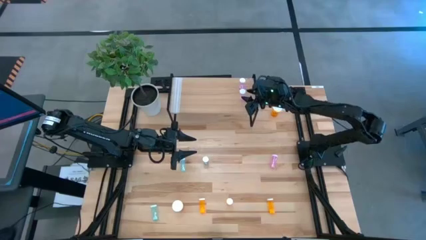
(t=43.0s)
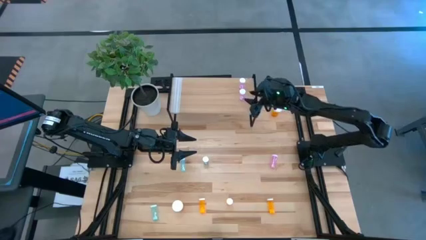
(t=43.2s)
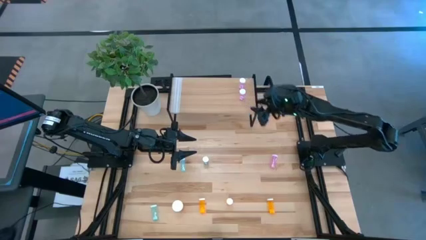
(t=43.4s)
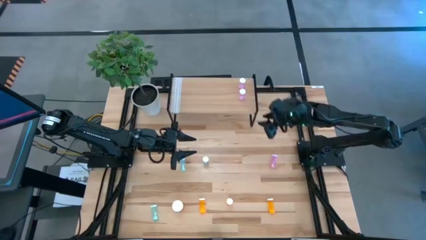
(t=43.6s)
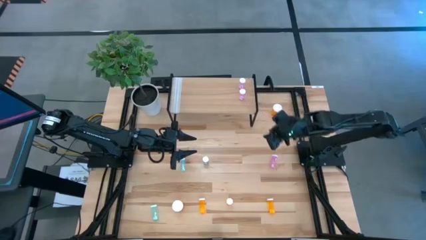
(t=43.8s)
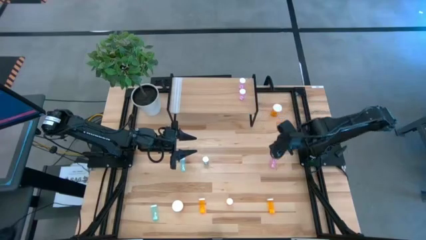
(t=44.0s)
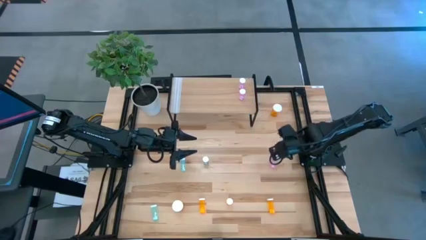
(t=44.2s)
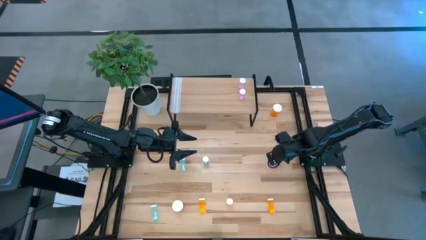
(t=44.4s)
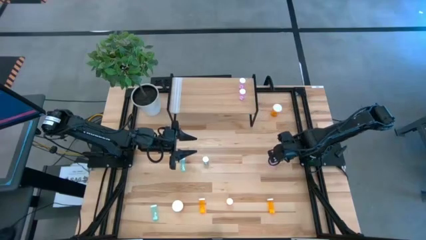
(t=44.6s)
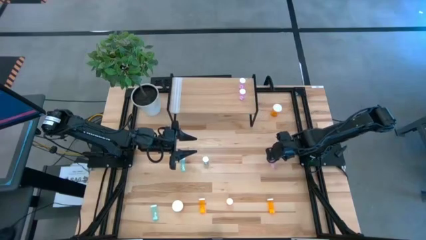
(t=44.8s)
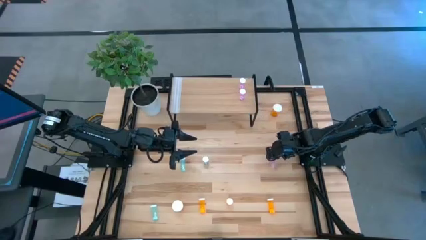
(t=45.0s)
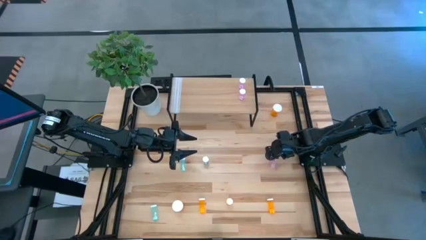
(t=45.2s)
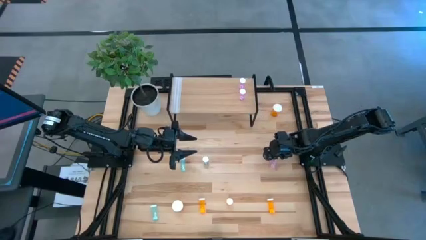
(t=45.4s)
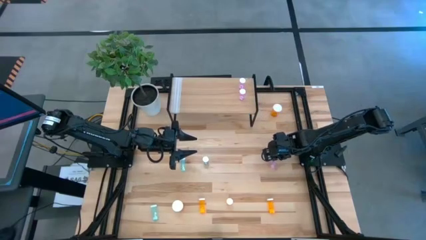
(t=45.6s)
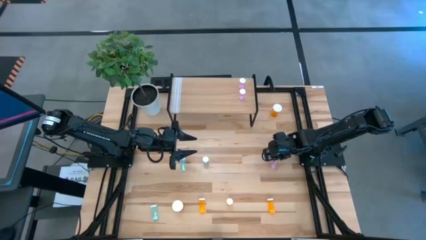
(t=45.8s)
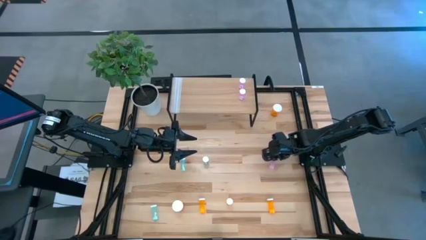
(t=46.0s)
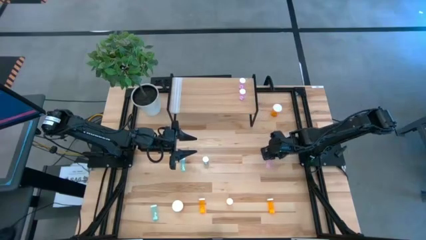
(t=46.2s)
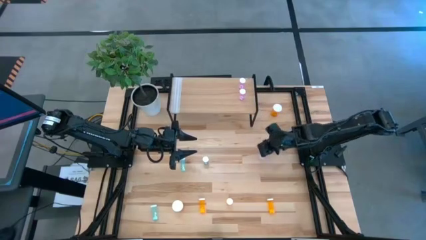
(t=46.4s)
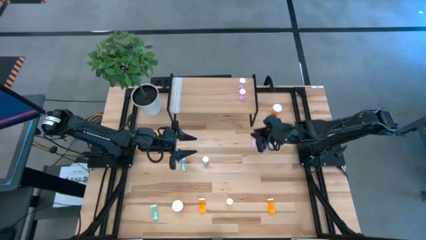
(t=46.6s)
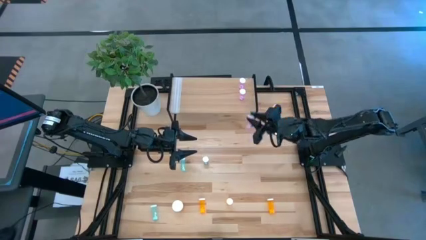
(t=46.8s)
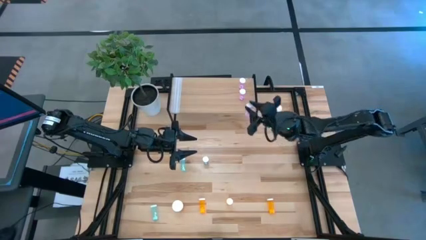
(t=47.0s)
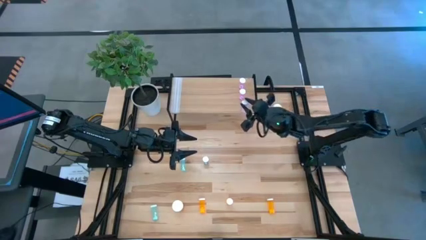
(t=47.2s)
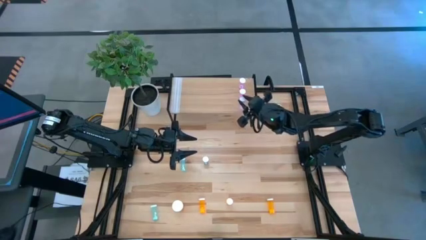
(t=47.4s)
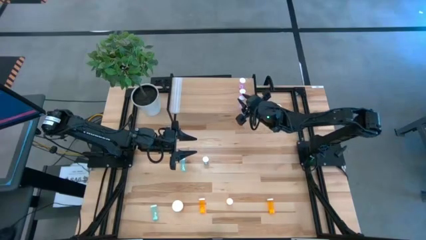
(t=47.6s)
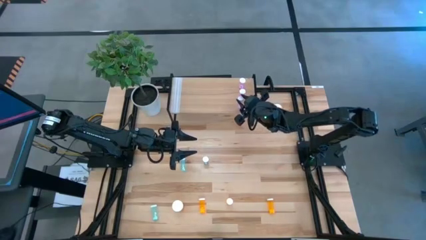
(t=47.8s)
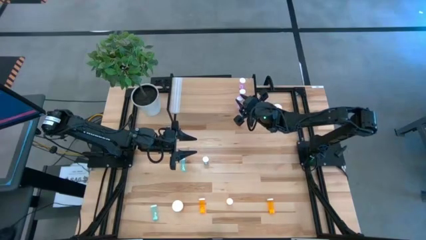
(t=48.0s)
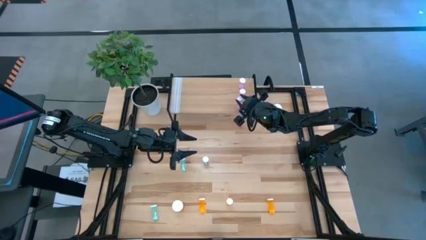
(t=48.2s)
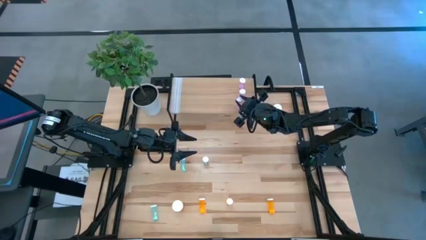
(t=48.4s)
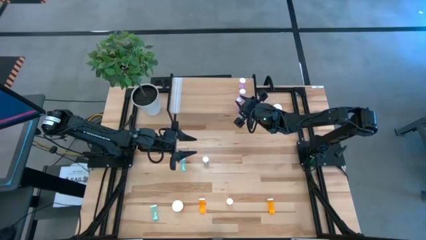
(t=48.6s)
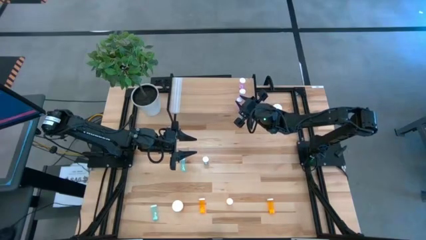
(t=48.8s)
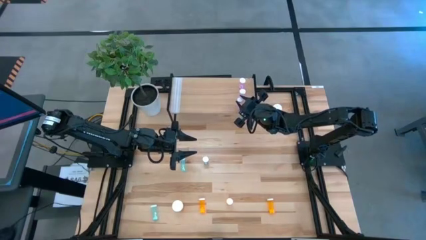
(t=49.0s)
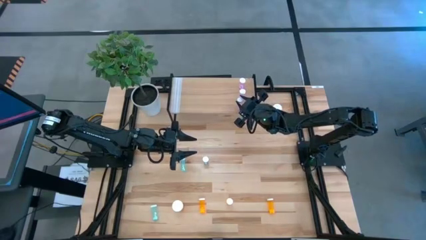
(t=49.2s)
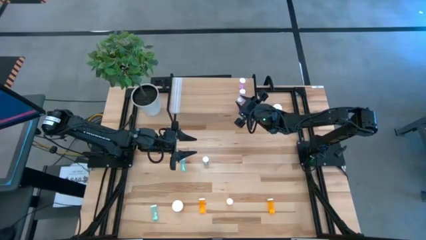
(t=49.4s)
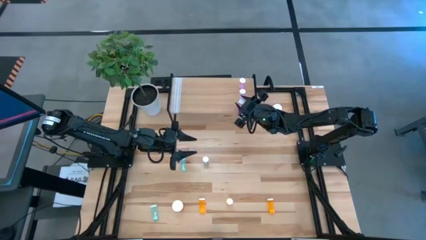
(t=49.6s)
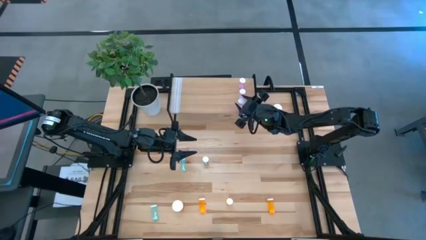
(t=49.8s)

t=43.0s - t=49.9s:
Task: Pick and place medicine bottles onto shelf by color
Put the pink pill bottle on the shelf aligned with the other pink pill bottles

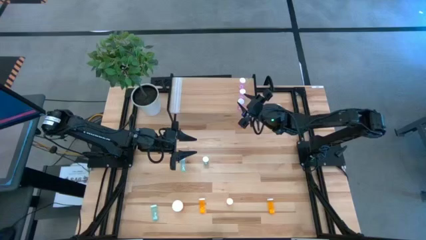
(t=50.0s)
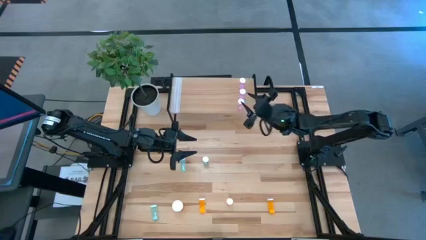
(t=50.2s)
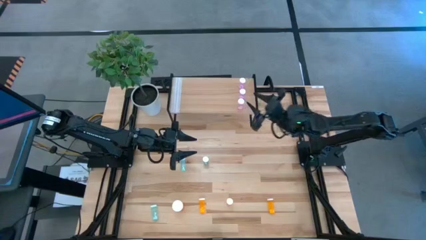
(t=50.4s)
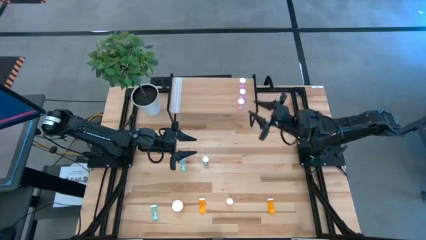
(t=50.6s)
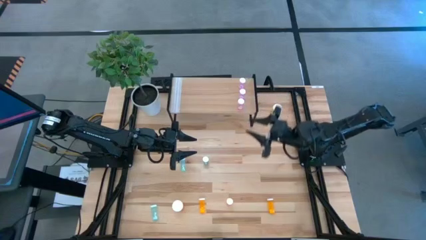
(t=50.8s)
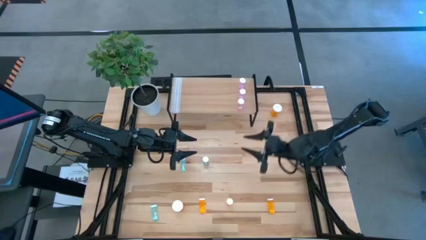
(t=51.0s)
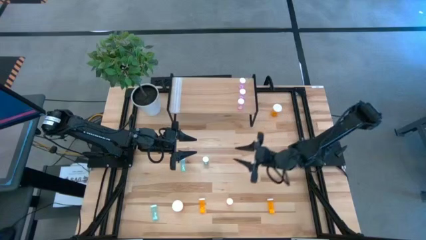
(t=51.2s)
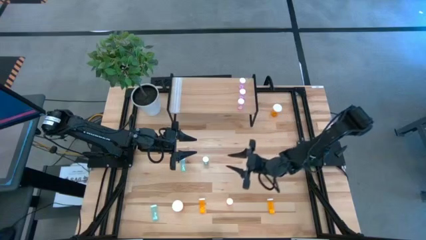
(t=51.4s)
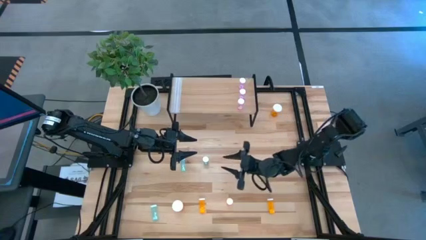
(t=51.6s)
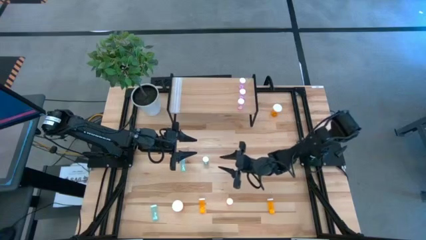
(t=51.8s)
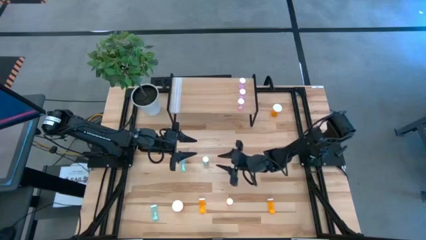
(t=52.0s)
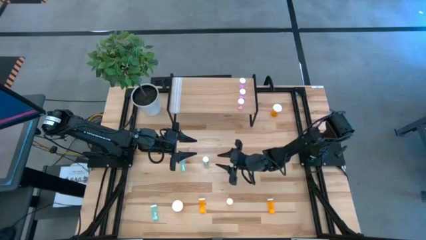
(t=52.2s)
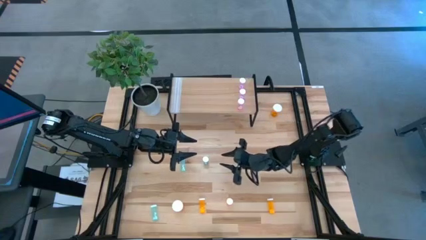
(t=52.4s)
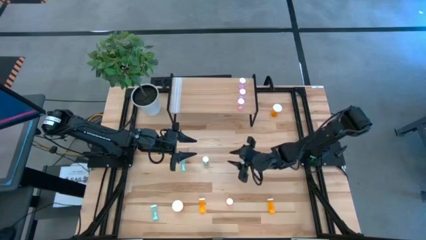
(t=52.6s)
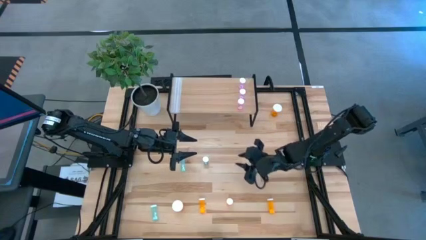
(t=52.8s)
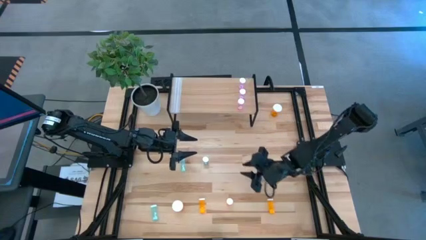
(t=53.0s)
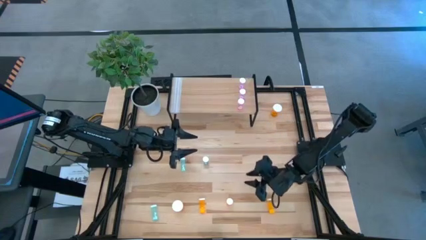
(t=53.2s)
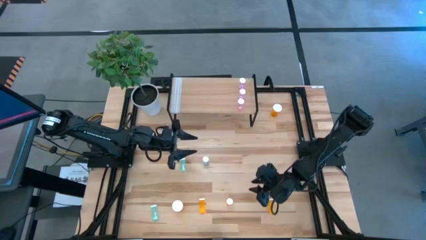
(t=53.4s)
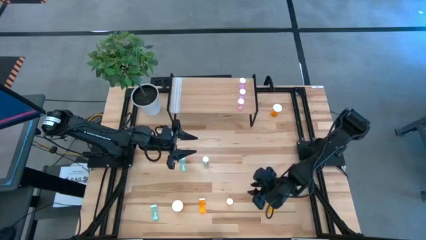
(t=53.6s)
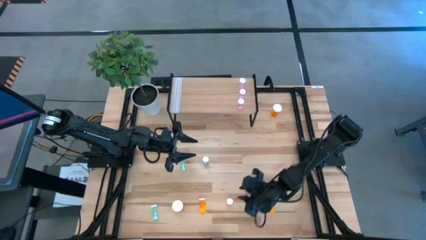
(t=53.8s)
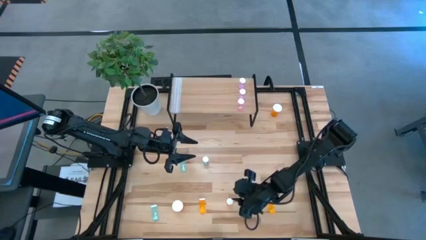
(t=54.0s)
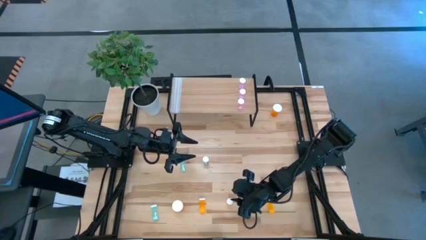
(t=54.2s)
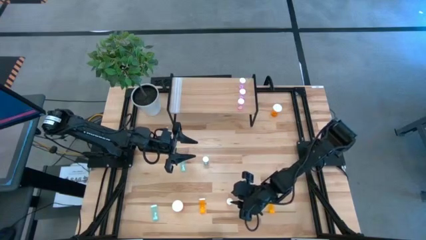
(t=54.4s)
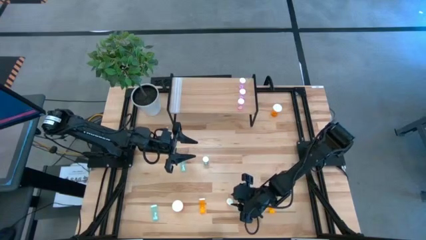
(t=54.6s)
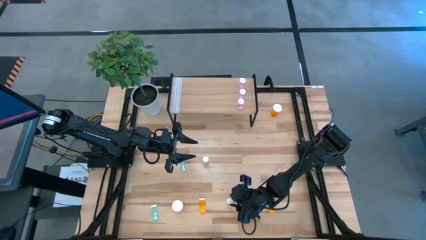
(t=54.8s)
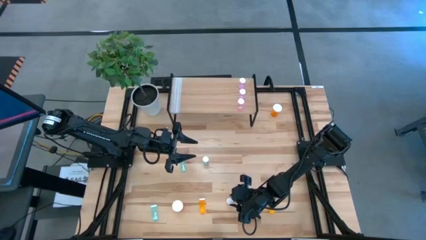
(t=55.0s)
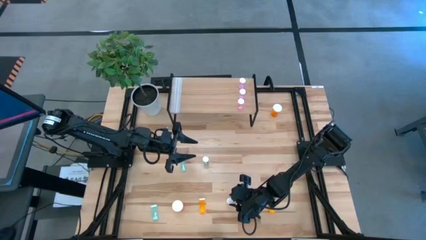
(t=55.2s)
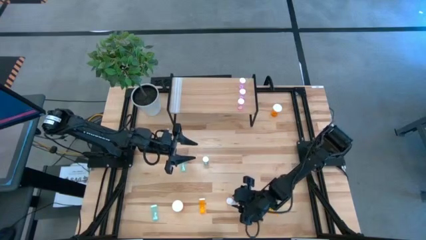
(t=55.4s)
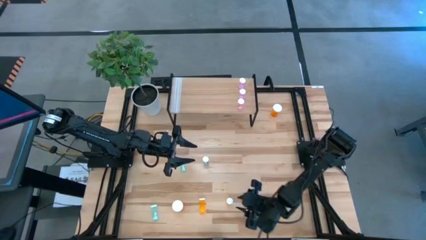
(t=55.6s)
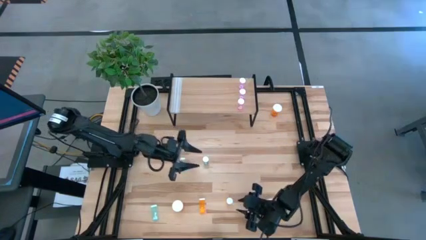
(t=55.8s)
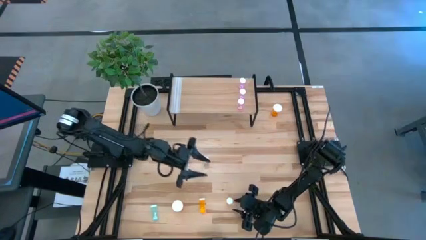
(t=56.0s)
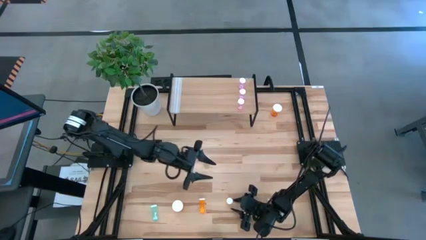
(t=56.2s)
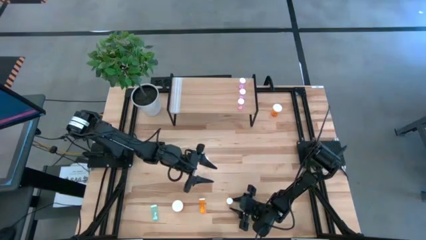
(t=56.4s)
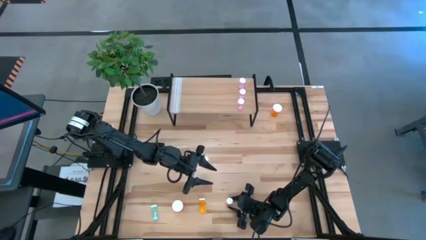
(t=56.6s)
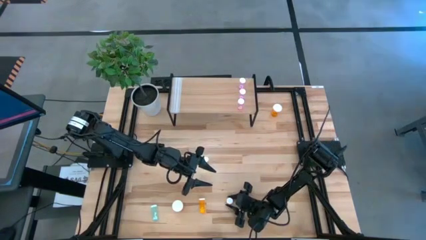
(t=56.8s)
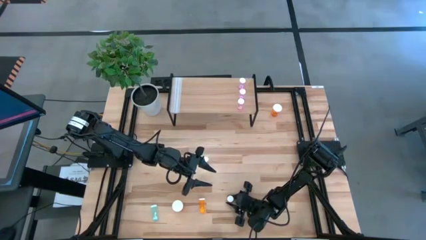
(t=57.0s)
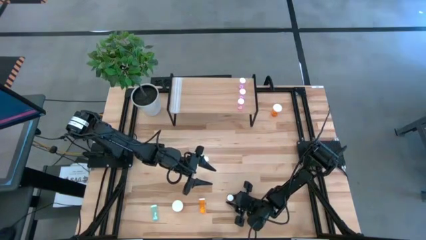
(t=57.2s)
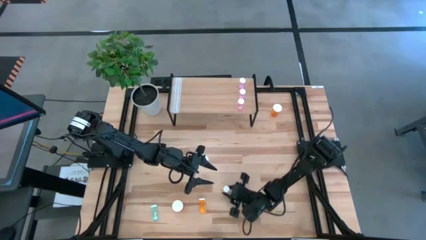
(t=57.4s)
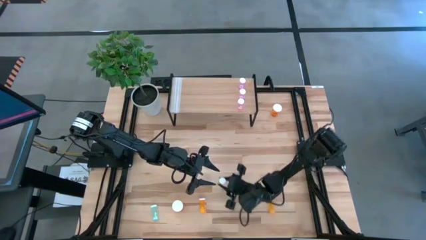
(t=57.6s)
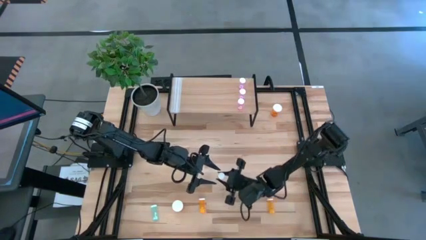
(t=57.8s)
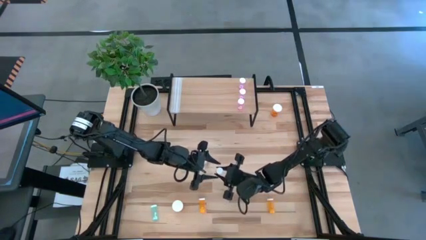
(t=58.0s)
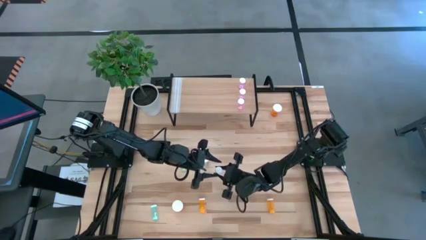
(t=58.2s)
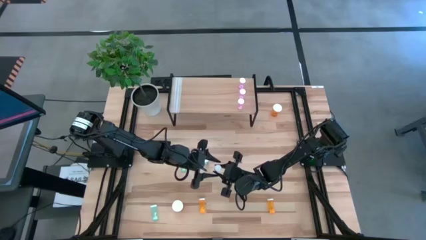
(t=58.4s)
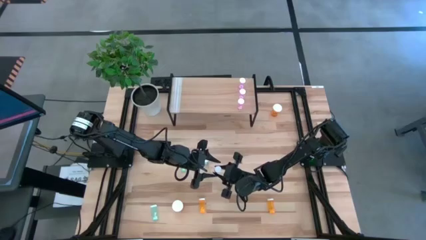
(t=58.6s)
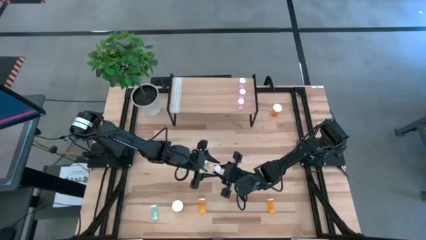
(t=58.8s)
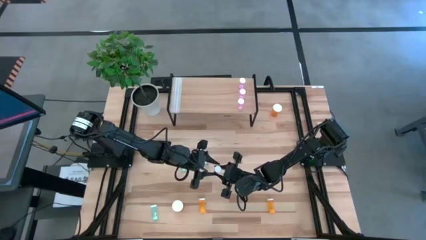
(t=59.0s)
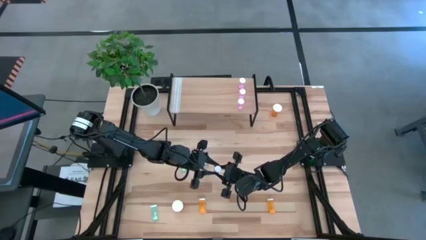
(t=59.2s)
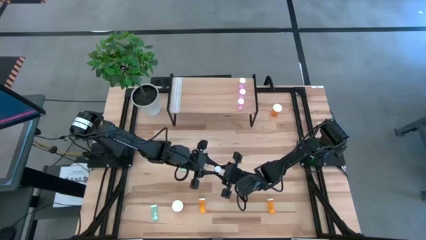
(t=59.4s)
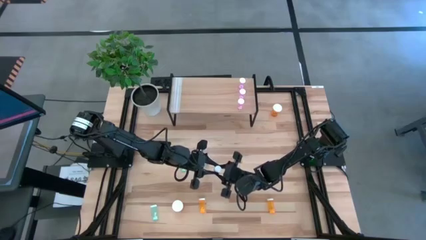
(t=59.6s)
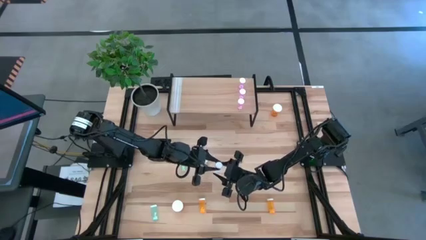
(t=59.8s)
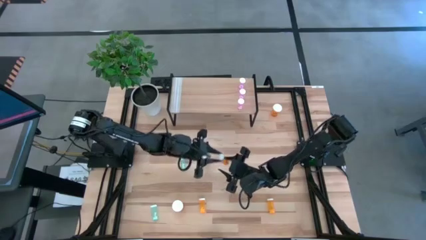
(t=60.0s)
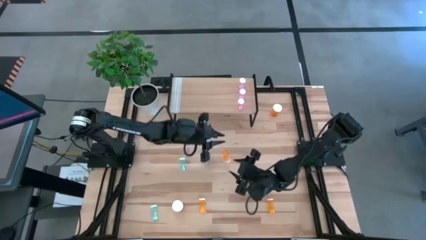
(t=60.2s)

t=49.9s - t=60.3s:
Put the middle orange pill bottle on the shelf
